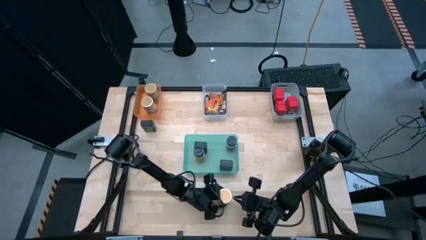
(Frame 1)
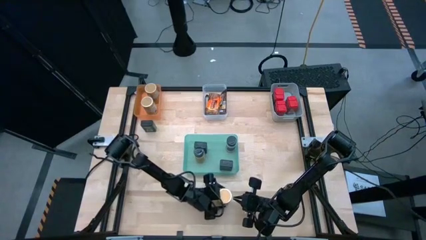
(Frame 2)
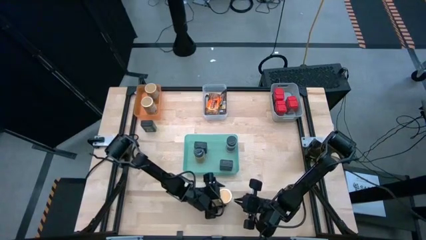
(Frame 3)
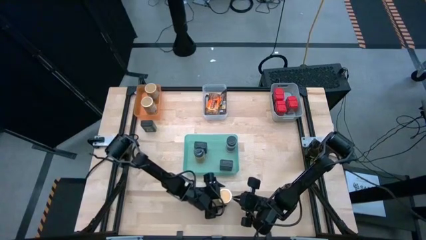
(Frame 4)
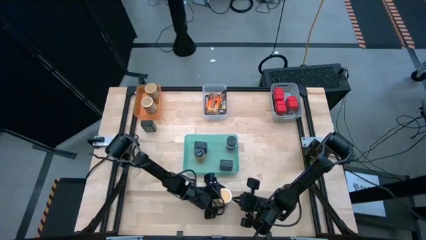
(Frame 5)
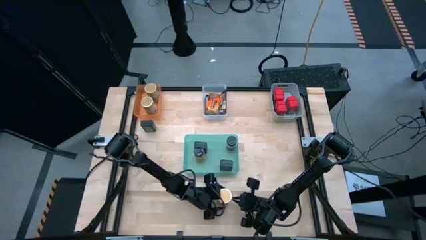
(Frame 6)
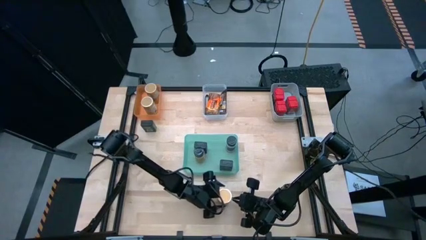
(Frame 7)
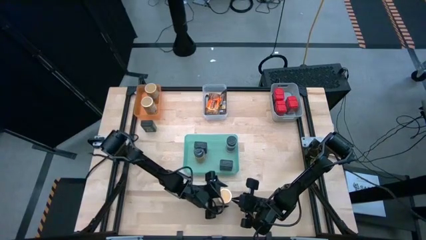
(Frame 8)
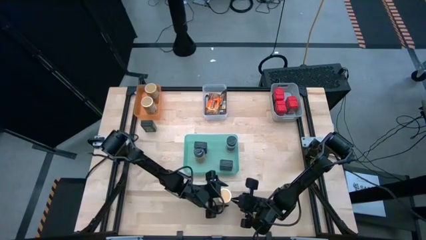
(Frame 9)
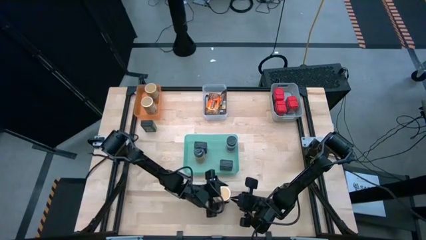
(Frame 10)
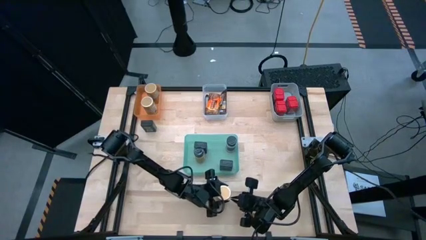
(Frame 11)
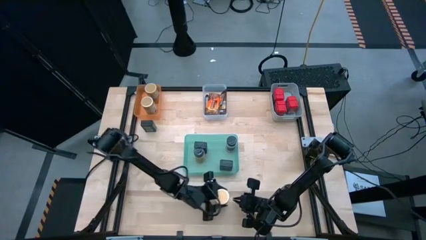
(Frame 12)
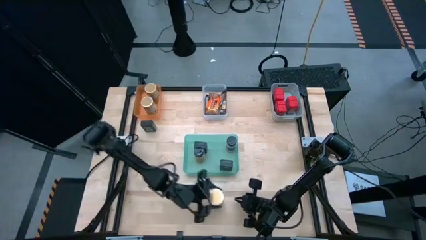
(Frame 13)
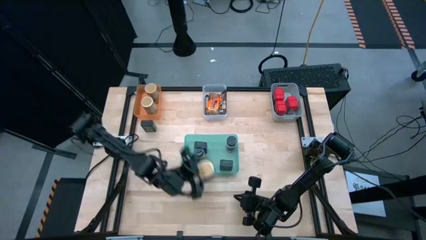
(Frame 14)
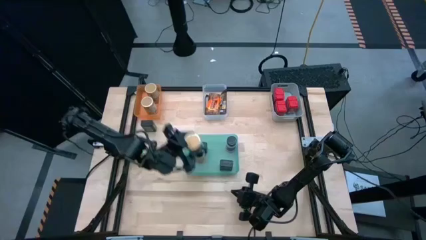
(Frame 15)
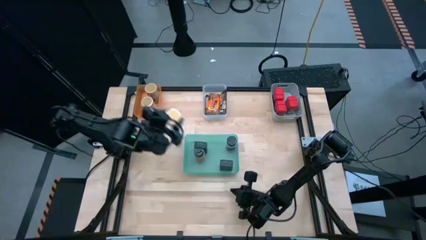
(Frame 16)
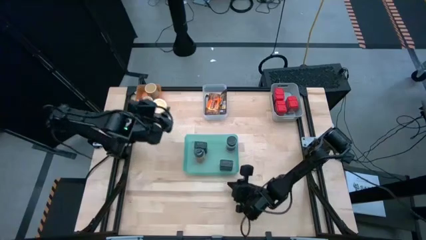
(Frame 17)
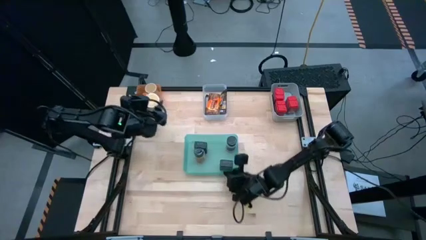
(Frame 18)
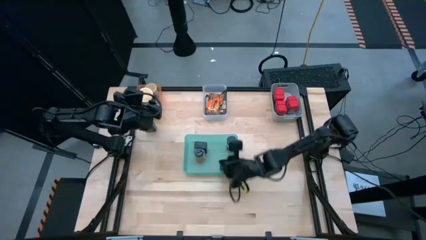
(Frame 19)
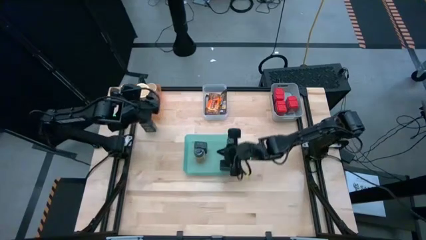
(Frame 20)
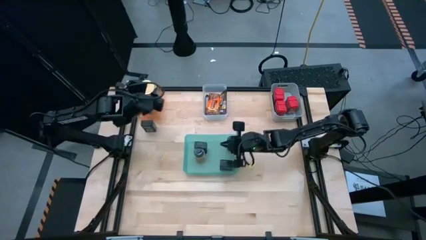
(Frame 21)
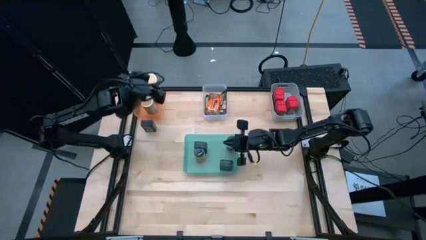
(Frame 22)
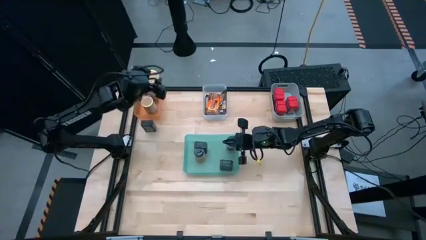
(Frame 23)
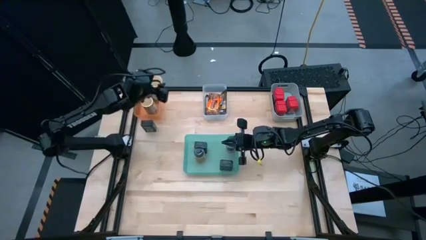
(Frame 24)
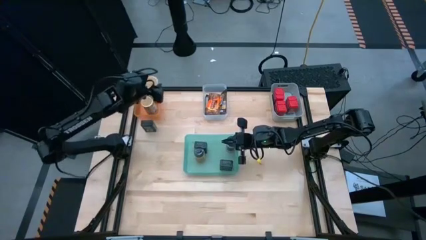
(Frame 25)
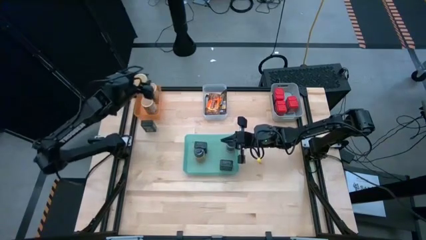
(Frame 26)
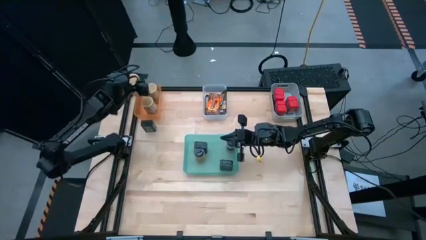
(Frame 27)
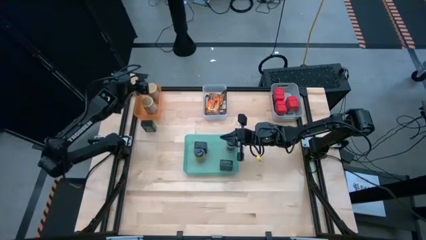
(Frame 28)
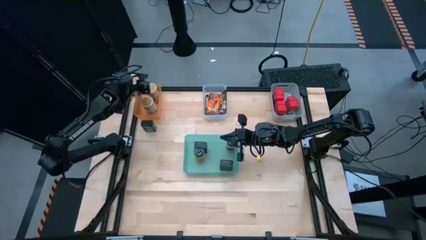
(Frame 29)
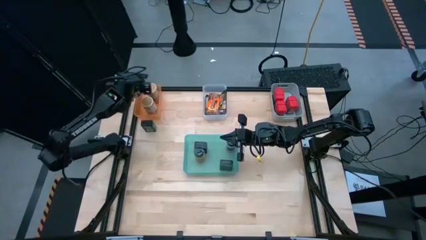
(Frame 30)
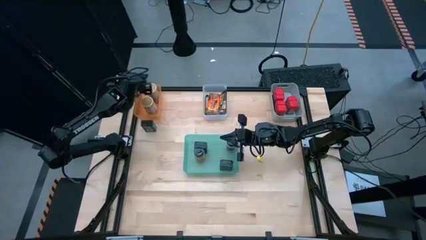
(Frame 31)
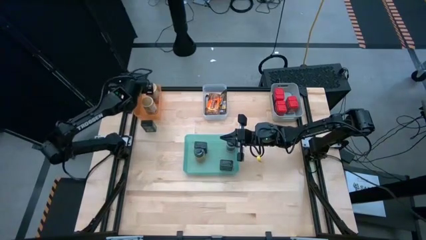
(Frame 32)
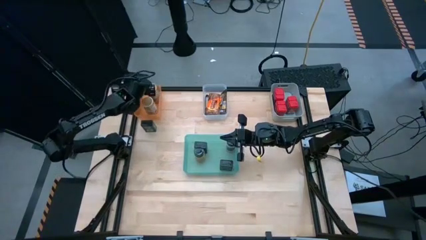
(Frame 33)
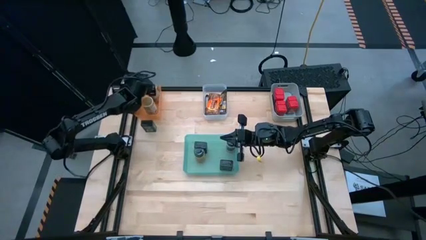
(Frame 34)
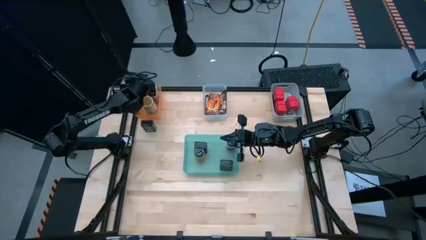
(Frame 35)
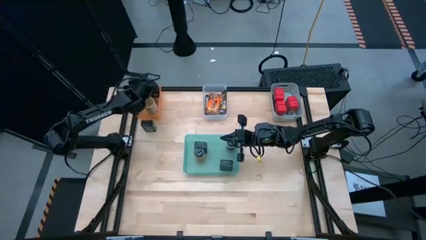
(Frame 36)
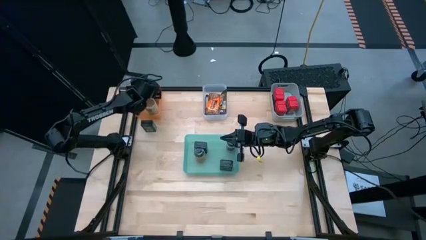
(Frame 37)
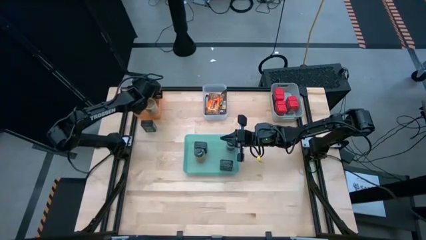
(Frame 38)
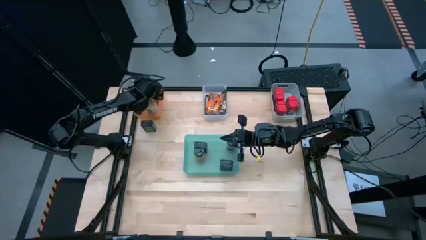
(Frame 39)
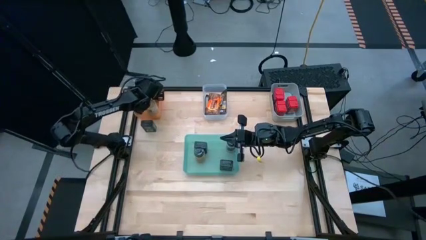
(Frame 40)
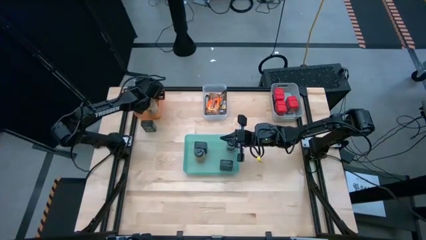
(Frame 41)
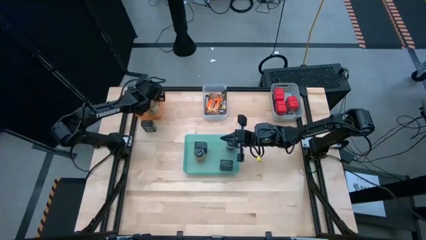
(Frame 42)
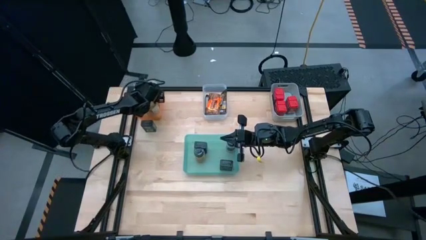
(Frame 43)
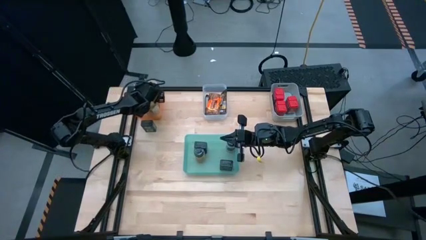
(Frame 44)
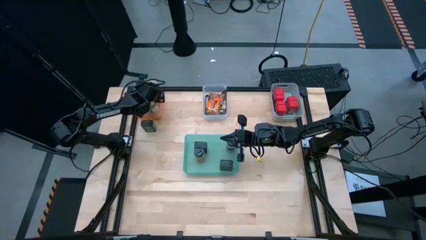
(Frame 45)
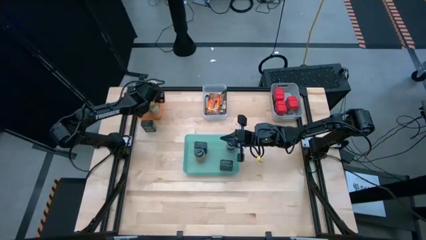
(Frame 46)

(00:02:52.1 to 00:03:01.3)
Task: Sort spices by type
Put the gold spice bottle into the orange bin

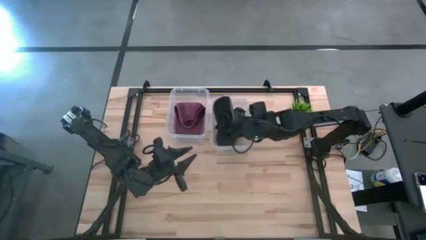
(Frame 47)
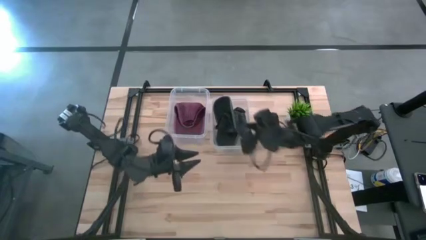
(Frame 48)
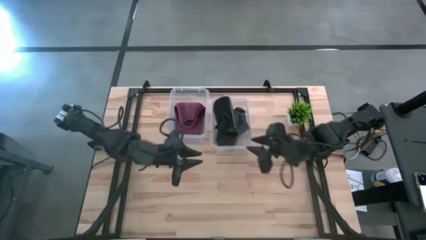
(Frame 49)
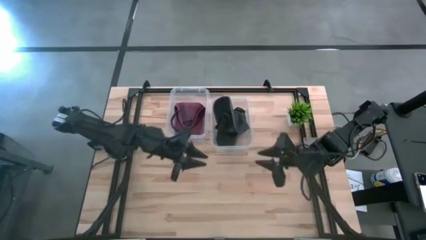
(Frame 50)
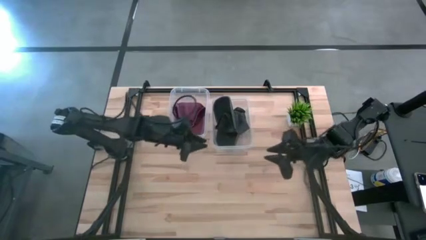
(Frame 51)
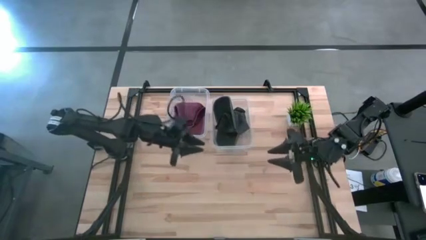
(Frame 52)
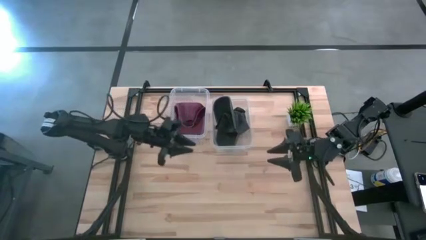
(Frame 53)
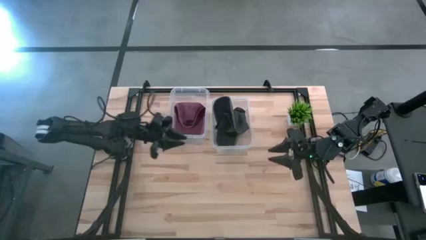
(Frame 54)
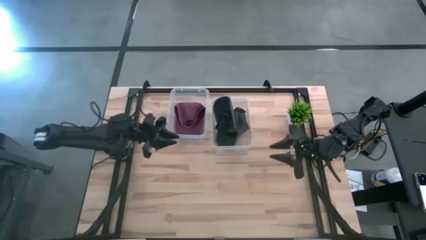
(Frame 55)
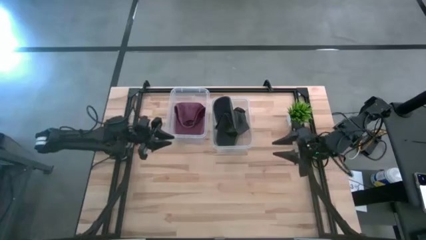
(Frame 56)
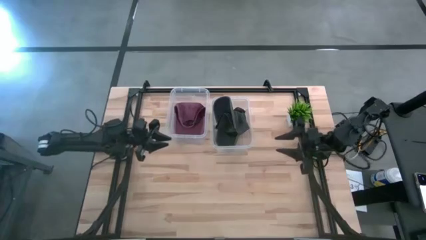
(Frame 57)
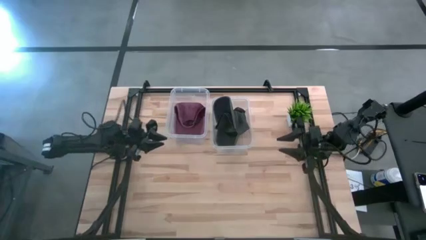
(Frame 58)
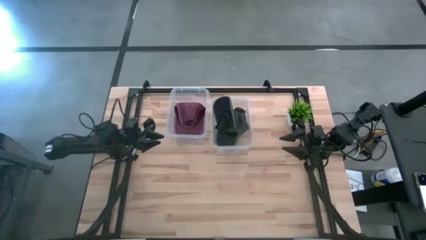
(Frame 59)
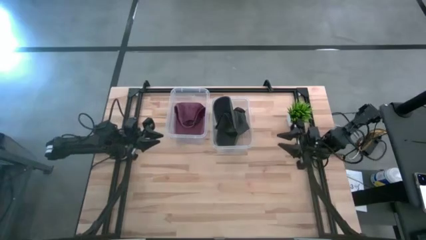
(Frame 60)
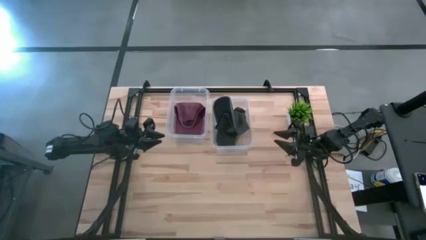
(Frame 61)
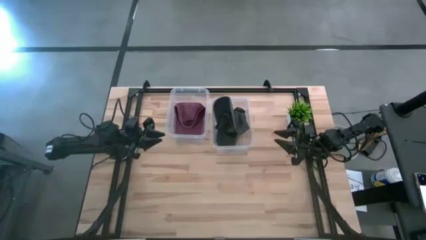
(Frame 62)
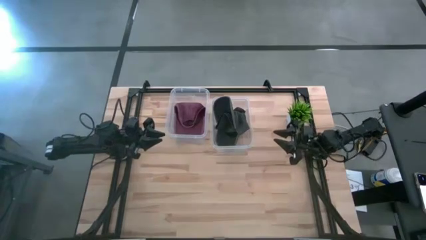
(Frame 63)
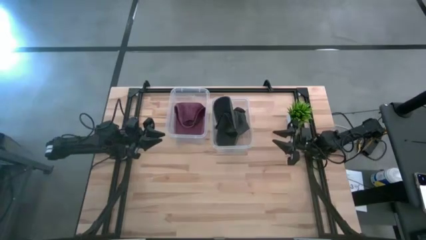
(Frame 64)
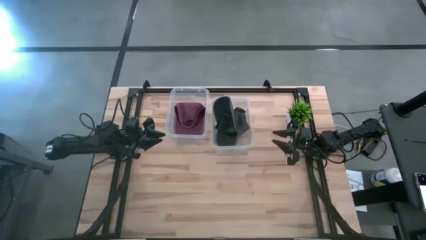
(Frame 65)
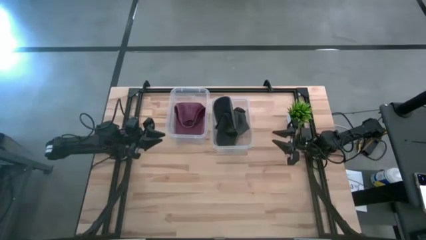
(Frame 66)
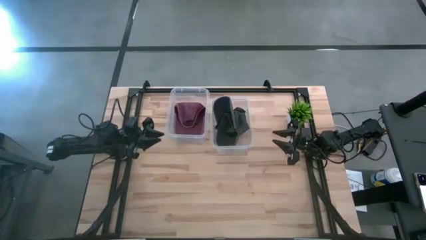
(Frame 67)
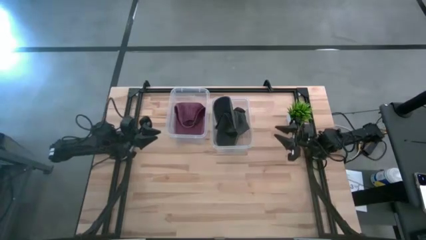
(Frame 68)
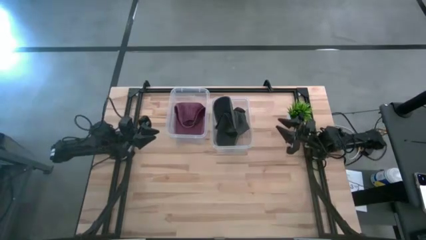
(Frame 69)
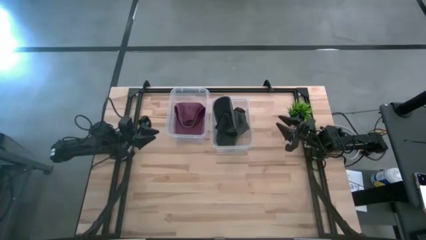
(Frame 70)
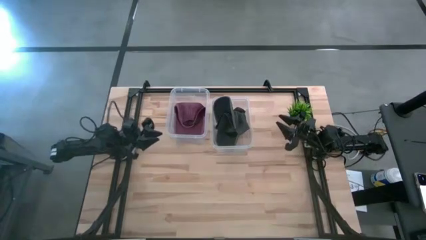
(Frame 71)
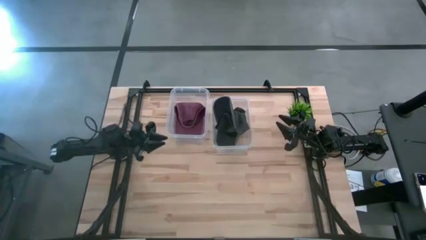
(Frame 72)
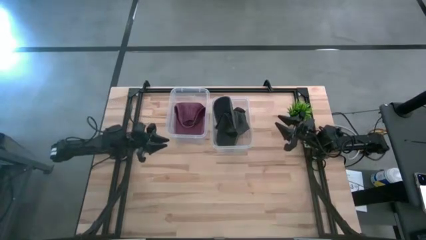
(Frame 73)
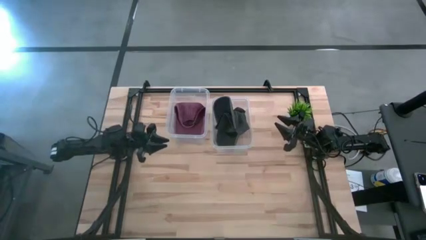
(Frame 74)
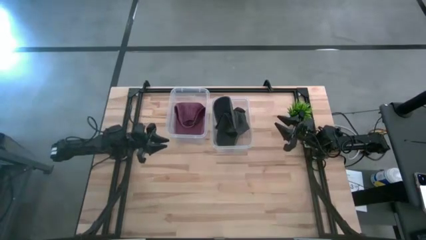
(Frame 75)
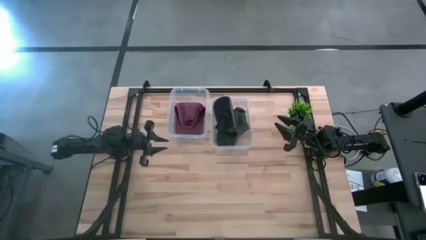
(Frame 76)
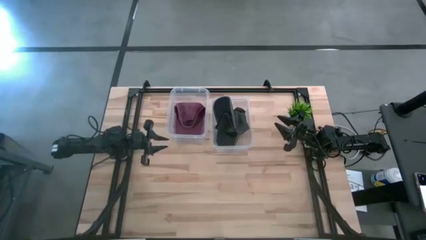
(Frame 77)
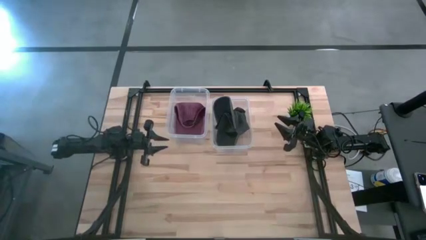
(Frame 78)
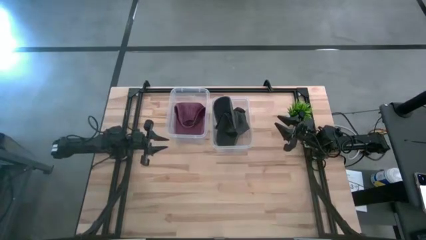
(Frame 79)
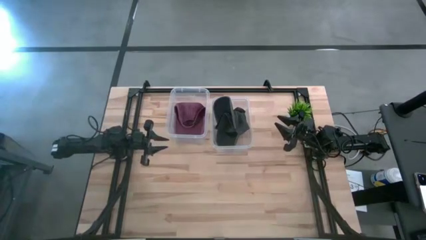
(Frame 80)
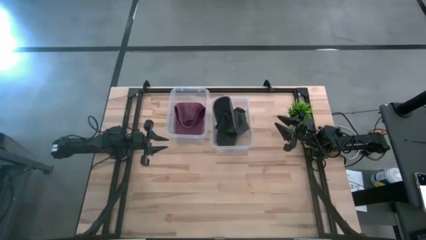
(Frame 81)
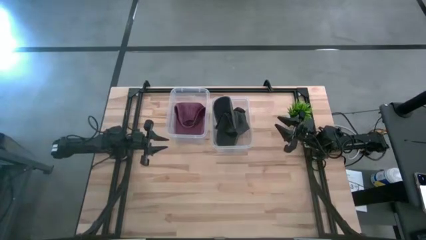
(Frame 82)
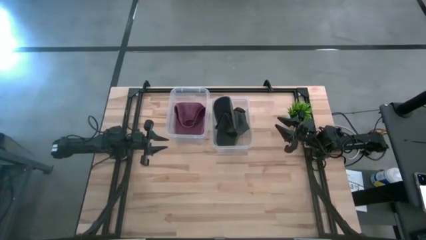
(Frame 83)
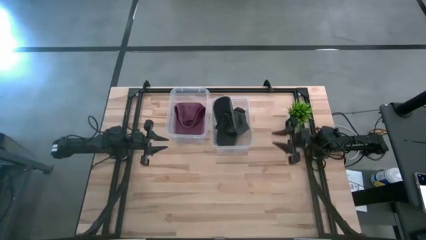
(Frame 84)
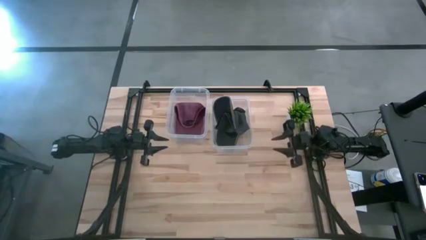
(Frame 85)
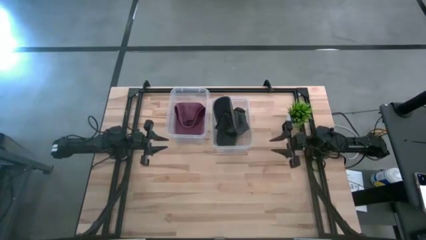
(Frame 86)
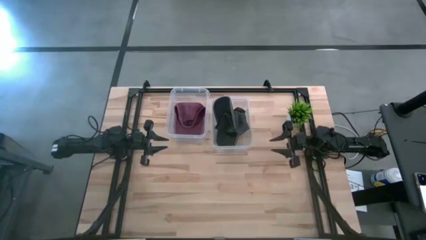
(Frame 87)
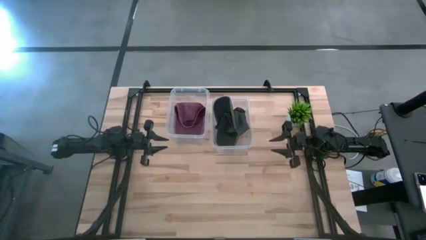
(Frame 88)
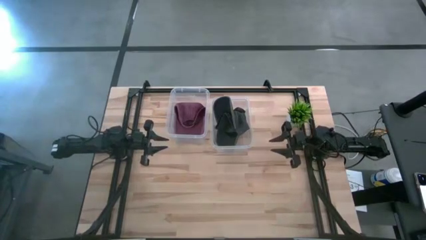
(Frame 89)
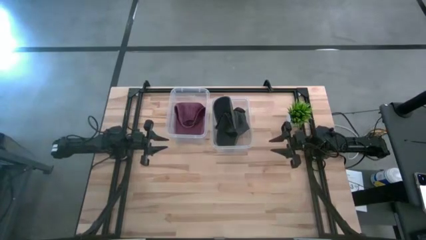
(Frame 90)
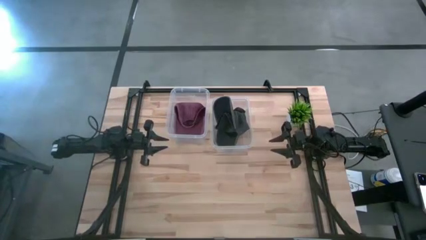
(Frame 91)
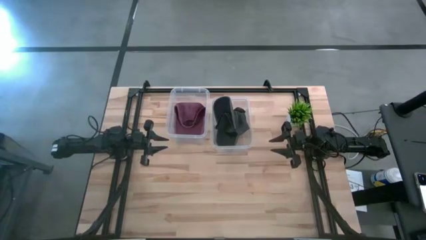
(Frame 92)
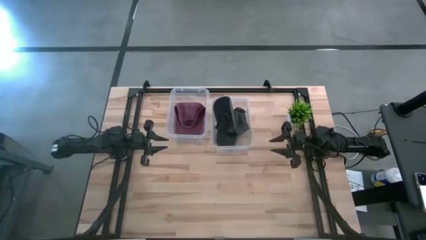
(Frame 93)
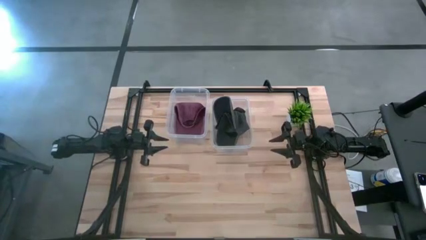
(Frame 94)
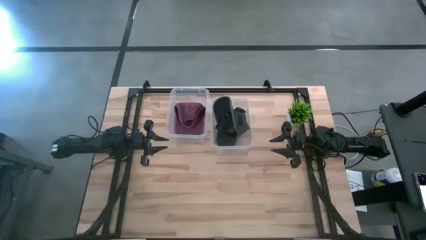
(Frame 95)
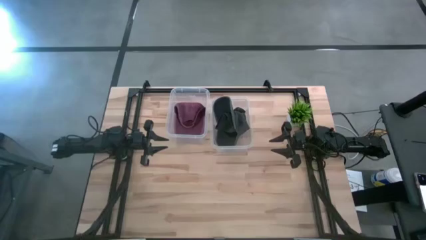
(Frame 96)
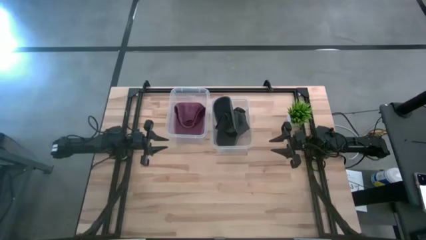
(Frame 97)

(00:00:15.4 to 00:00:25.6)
Task: Pick & Place hat
Return to Home Position
